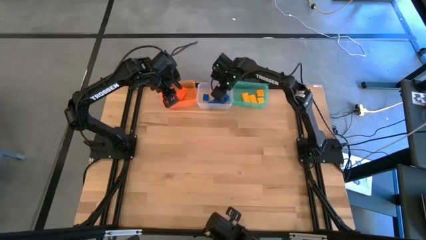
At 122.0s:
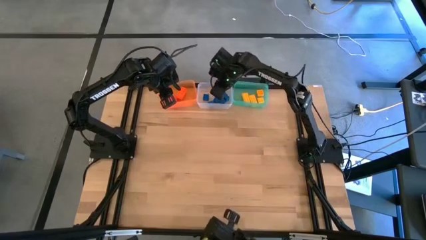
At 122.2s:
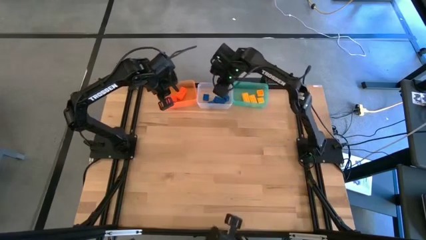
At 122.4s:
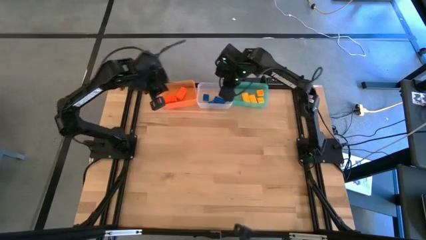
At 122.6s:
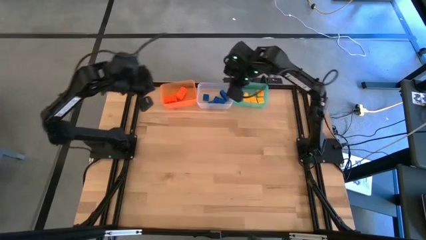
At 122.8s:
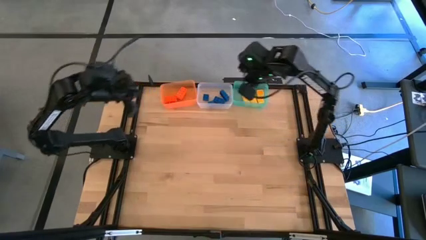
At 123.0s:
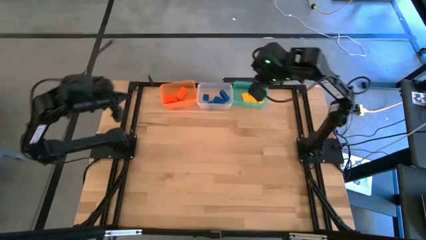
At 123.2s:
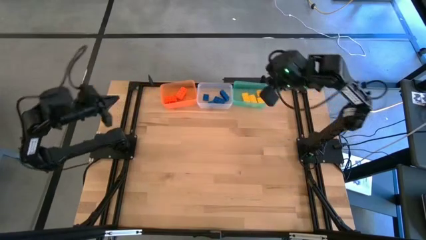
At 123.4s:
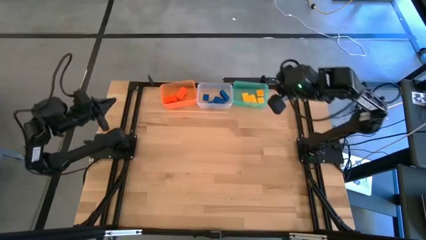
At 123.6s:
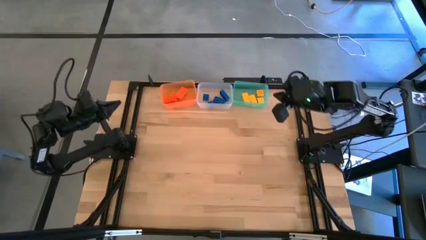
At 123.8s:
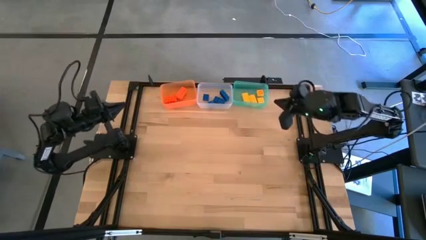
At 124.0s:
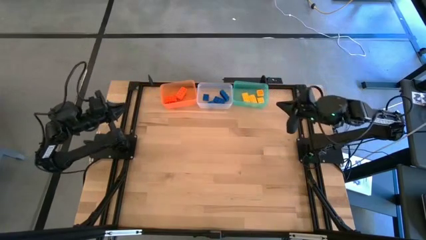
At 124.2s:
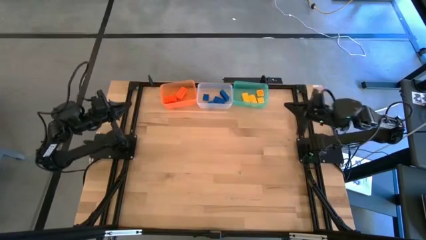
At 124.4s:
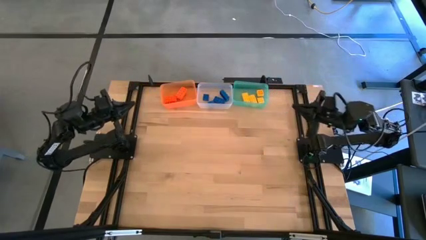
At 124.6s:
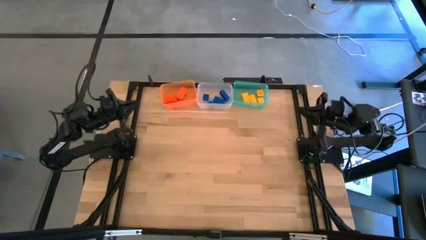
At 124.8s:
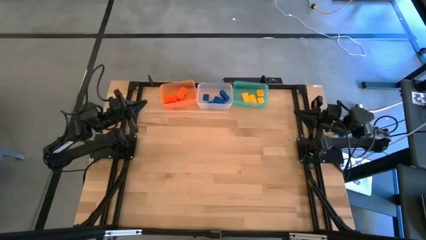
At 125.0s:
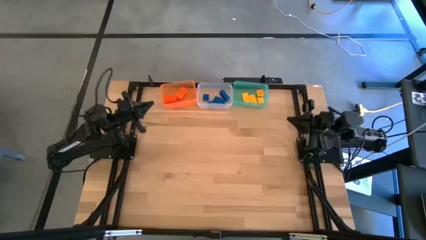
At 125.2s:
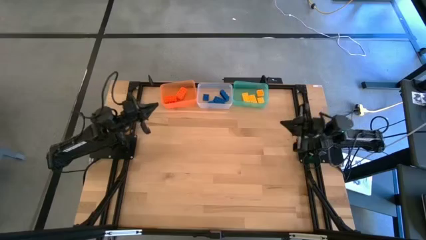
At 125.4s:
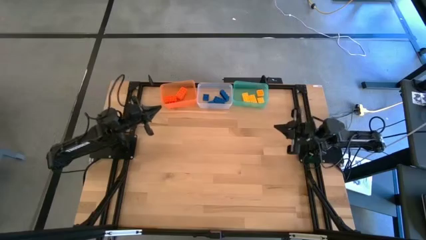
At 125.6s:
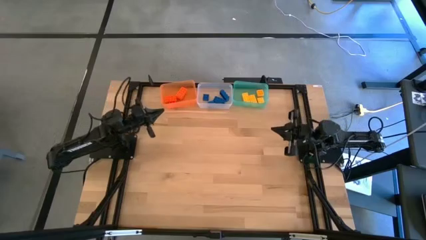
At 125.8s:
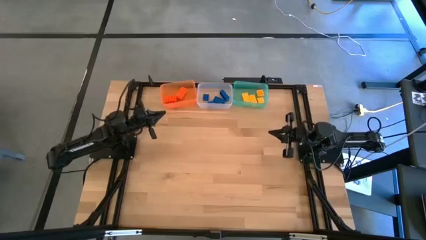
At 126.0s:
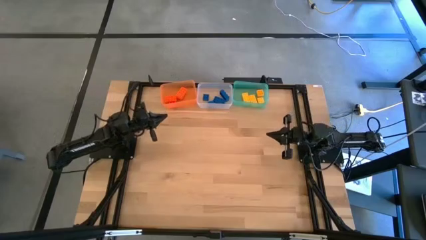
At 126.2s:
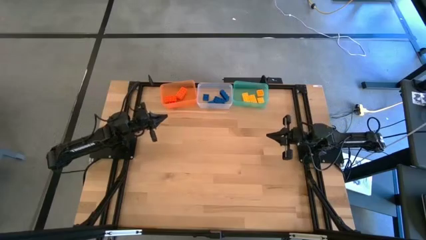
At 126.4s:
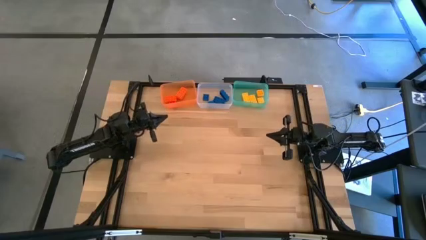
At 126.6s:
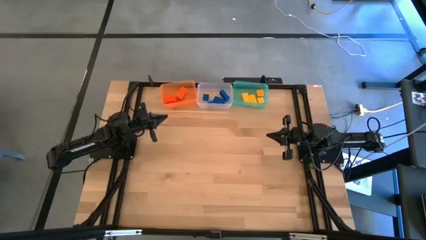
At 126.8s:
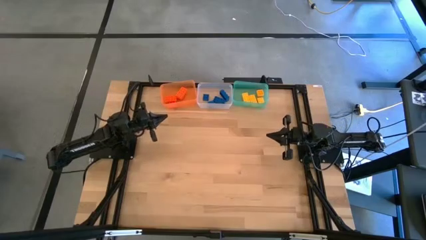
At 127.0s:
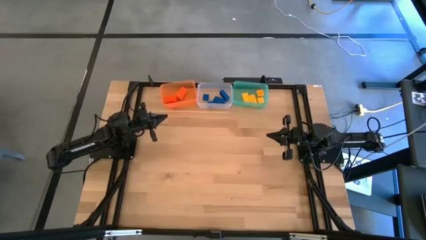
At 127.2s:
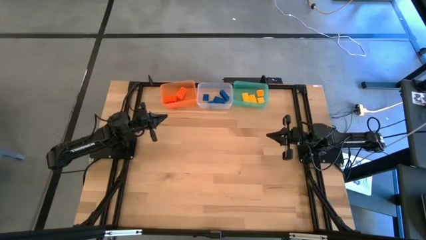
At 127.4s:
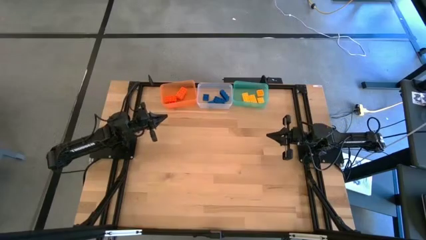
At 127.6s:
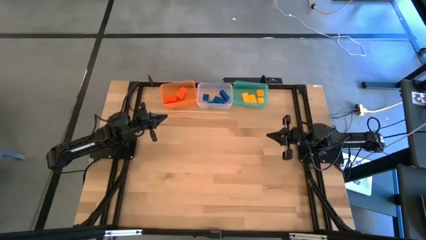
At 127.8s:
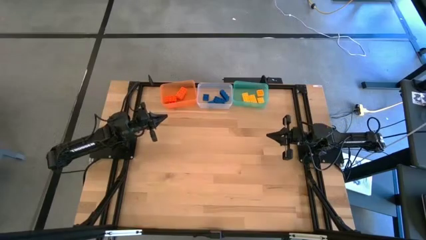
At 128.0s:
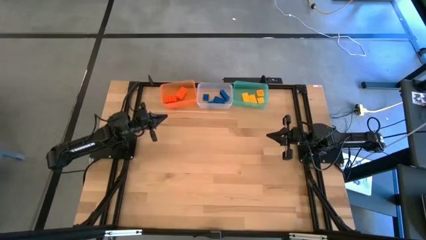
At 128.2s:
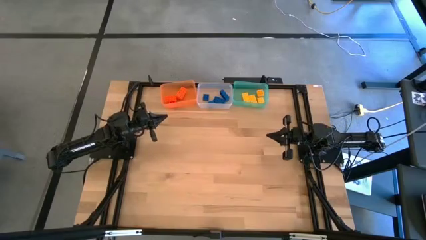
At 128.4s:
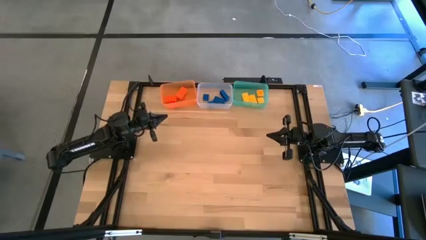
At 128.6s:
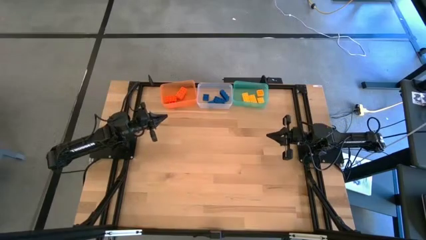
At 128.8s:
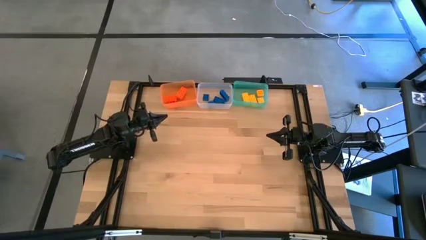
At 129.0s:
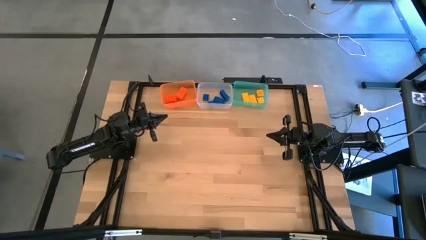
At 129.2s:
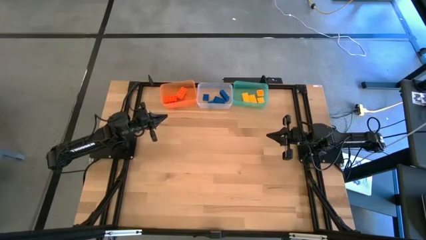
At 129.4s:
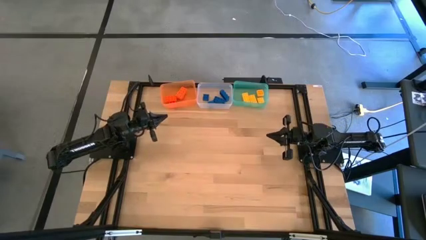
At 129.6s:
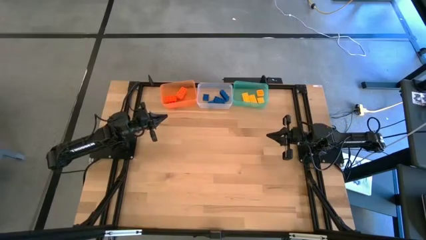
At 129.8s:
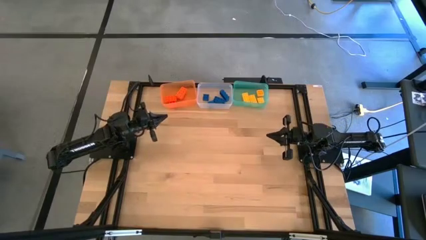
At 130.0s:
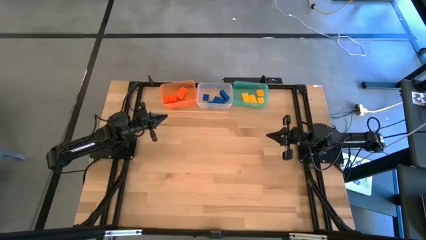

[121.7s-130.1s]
Task: Sort & place blocks by color
Return to Home Position

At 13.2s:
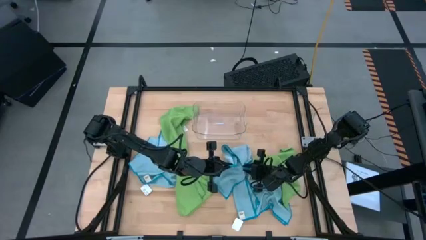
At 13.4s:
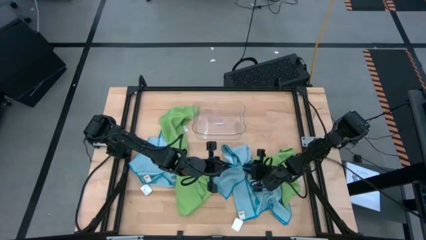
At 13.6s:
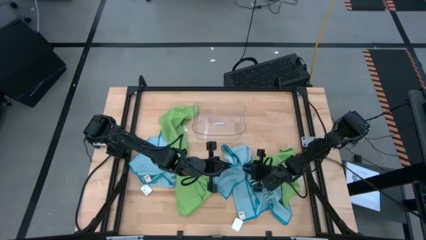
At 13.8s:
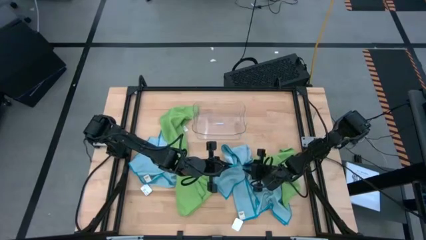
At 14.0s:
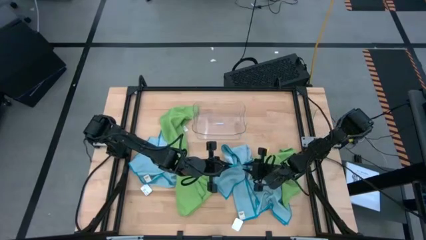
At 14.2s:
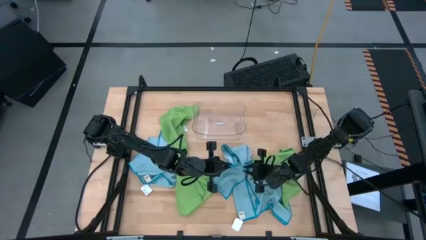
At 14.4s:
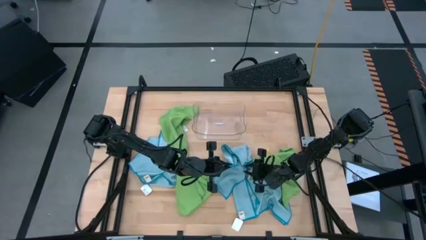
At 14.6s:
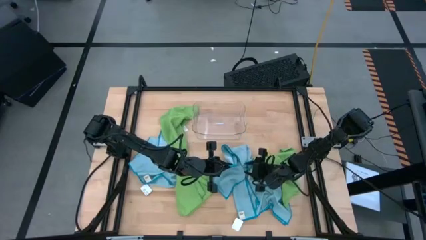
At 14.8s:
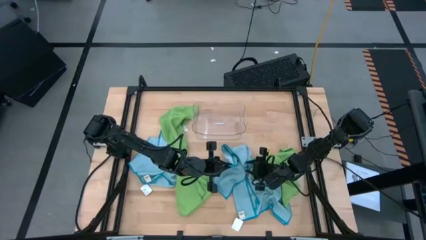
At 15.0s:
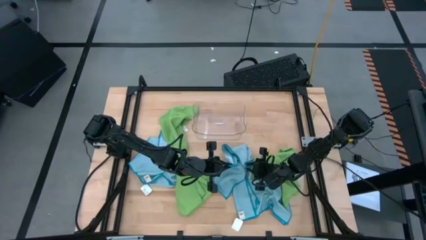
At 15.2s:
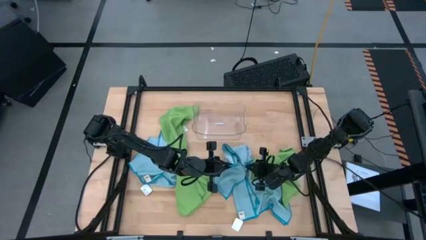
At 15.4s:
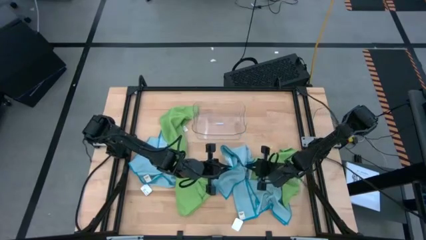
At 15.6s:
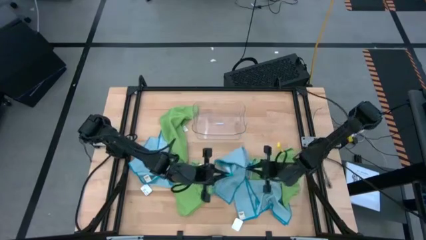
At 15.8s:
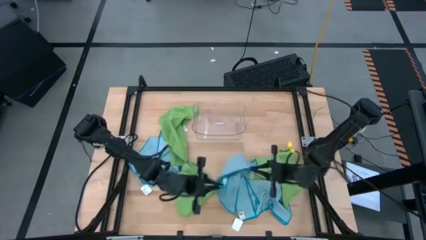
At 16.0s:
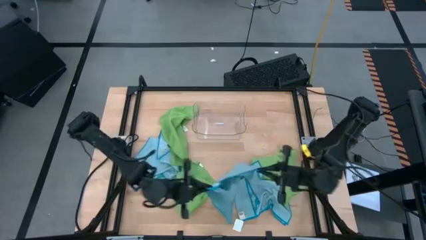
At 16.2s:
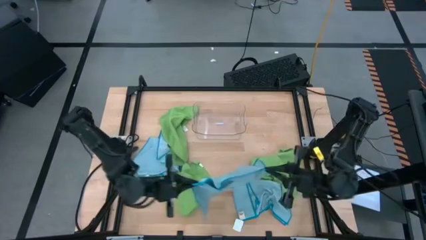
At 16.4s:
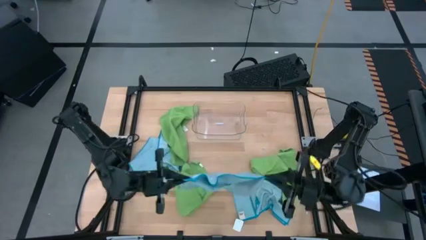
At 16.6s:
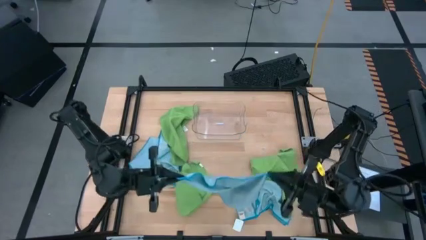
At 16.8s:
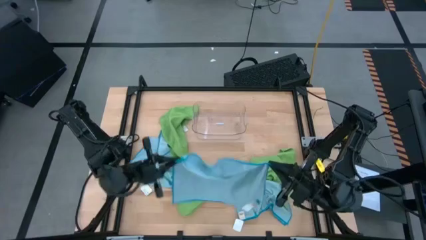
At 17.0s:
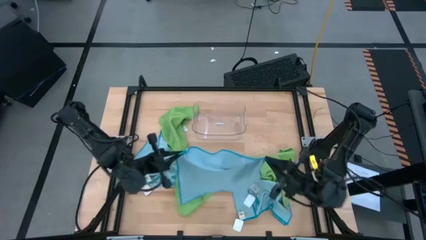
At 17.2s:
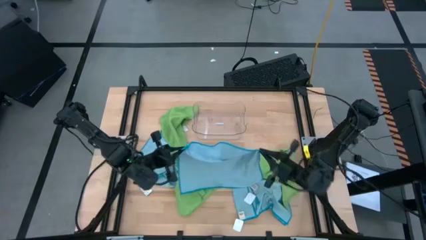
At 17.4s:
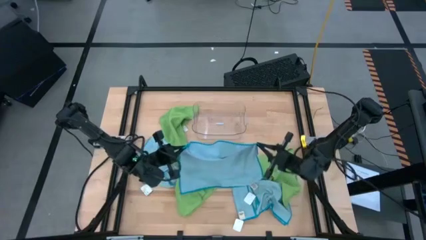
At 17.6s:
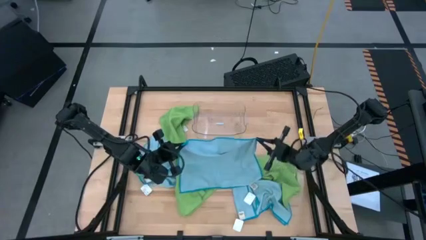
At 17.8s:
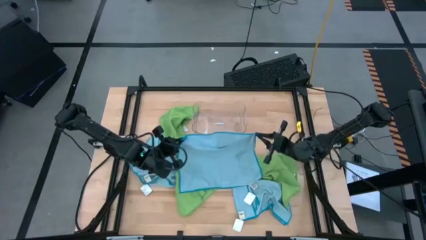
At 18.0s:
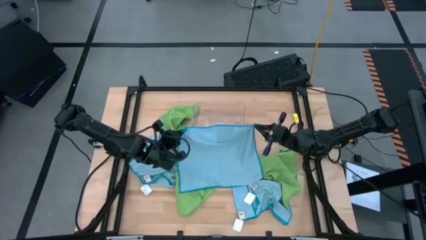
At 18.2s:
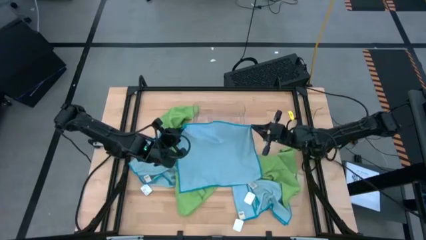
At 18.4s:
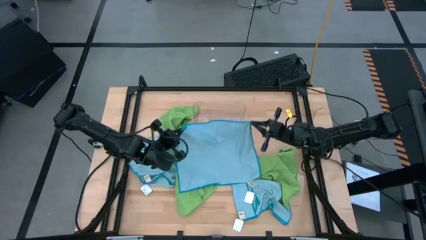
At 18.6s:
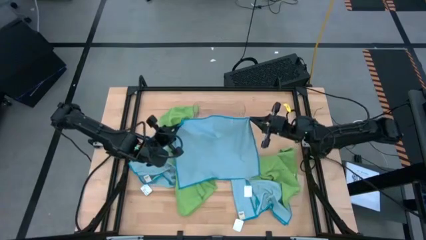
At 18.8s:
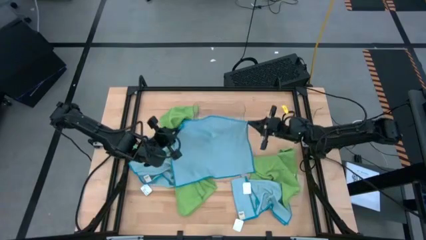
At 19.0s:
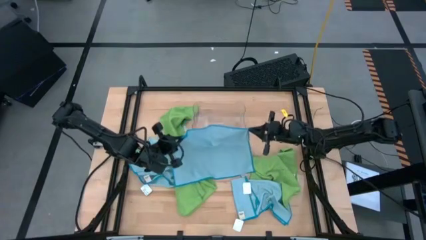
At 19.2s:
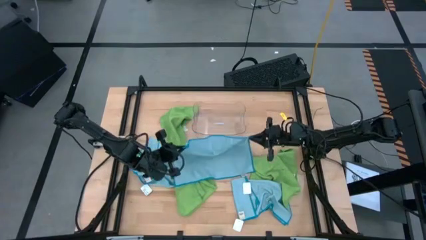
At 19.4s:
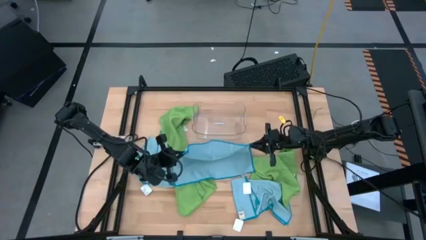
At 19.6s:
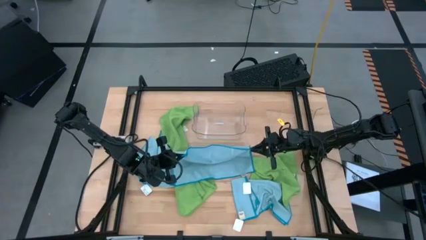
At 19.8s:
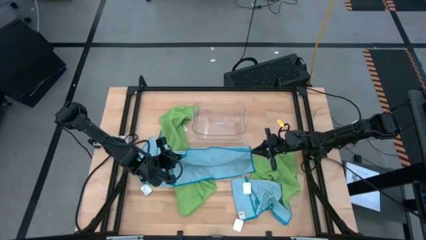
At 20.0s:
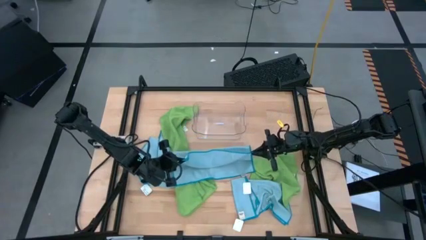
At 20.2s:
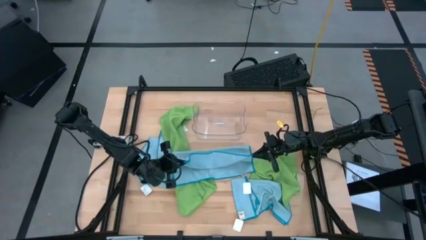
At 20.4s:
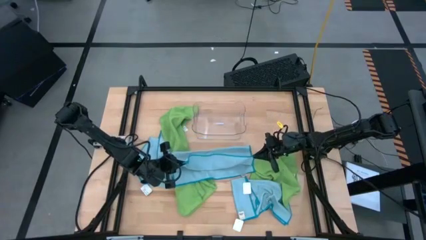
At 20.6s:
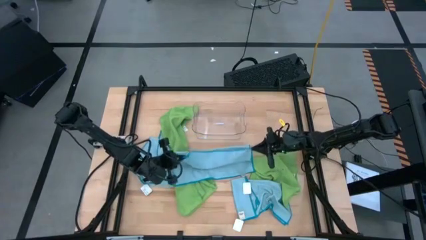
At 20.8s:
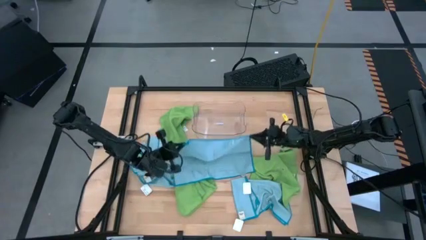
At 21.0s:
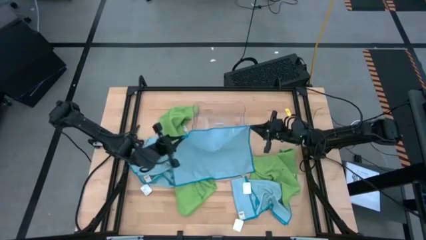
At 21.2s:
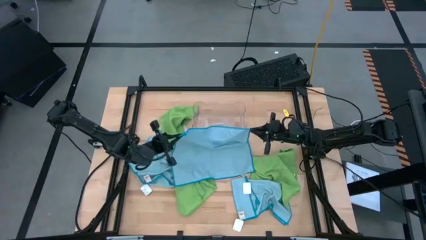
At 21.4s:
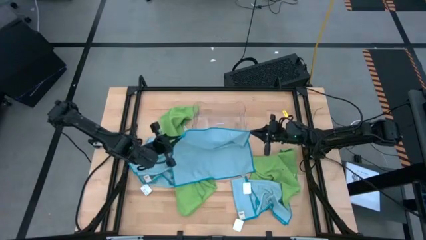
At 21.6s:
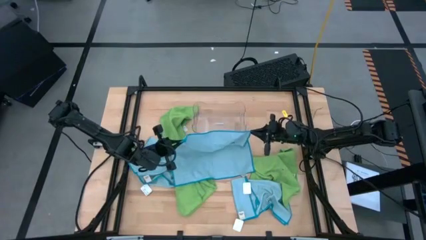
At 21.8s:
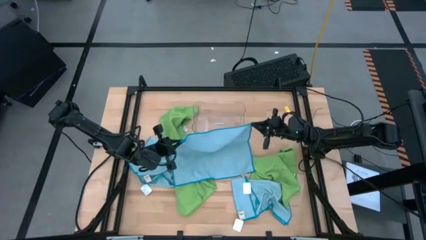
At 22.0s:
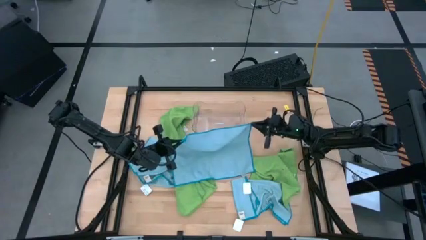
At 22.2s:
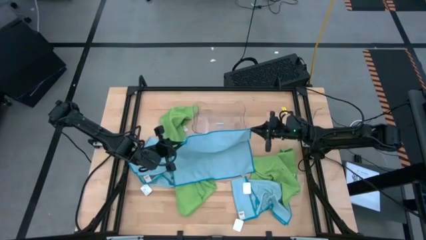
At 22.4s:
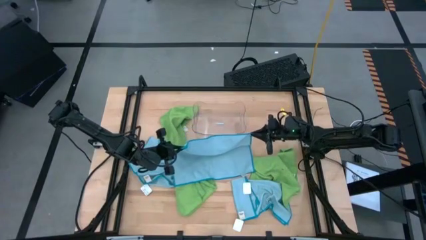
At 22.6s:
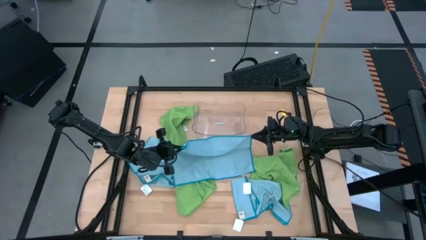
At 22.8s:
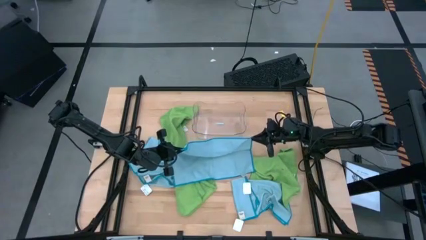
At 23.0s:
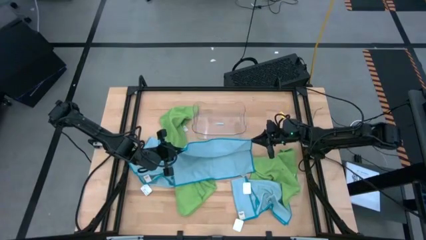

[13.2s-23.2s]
Task: Fold microfiber towels
Fold the top right blue microfiber cloth
